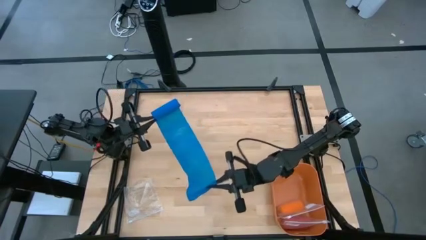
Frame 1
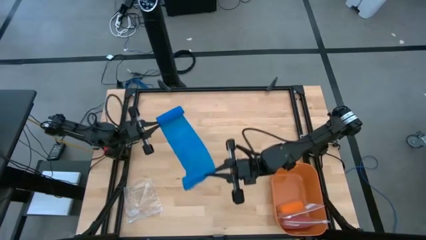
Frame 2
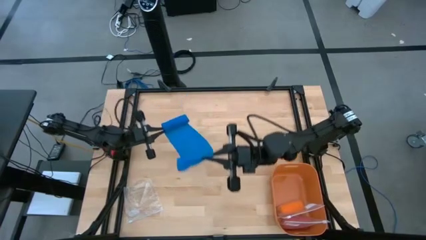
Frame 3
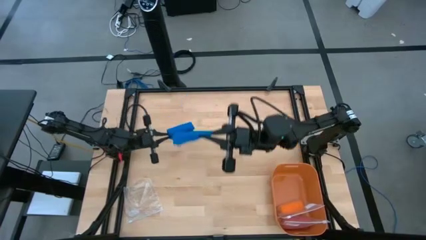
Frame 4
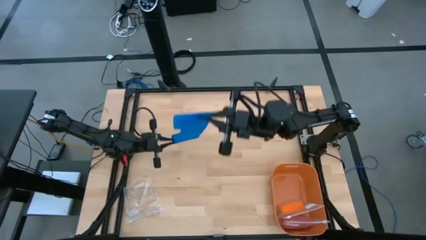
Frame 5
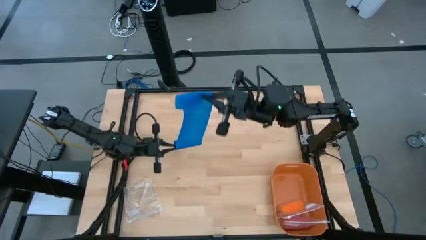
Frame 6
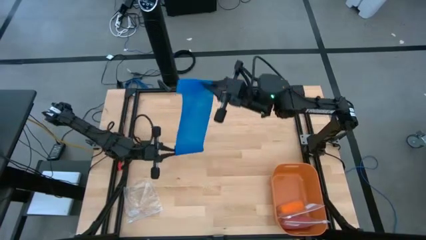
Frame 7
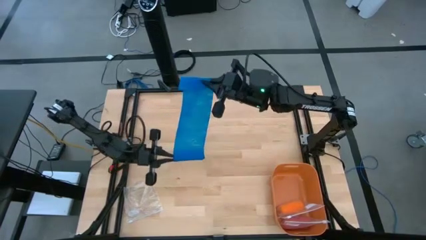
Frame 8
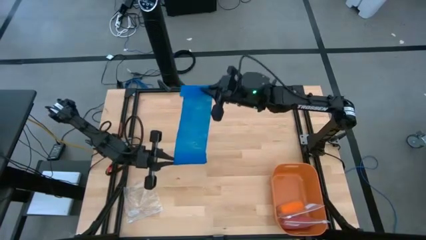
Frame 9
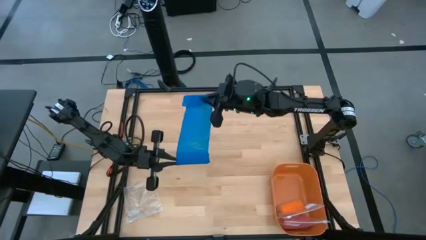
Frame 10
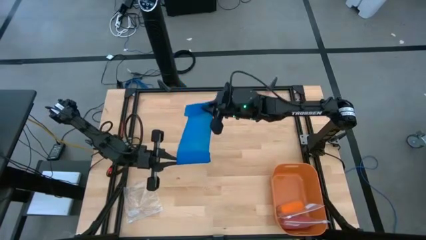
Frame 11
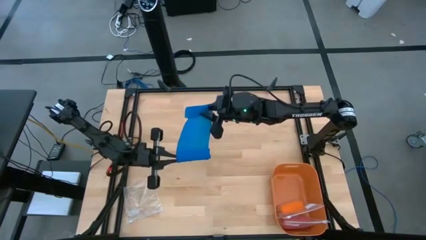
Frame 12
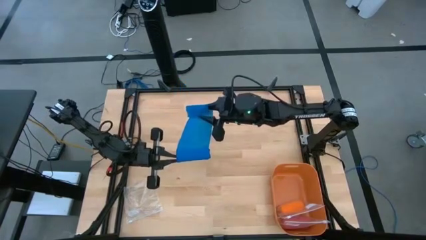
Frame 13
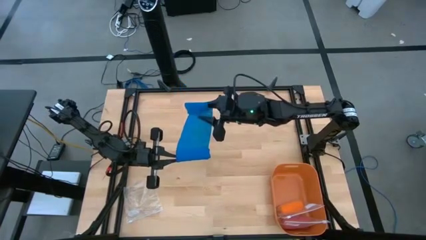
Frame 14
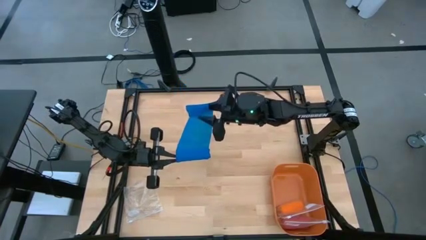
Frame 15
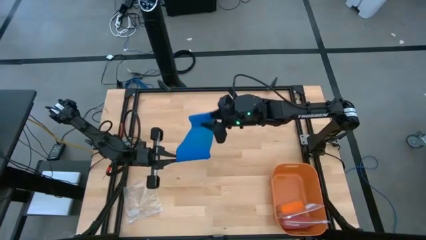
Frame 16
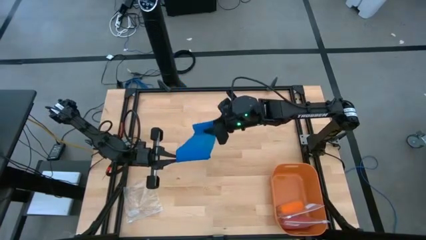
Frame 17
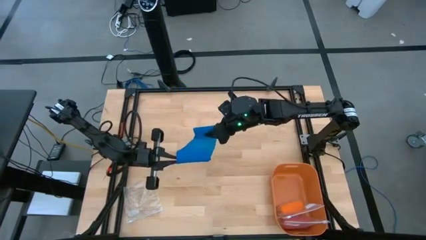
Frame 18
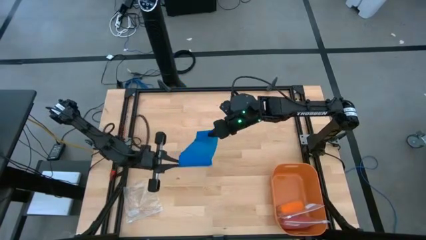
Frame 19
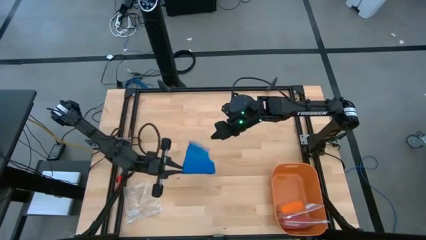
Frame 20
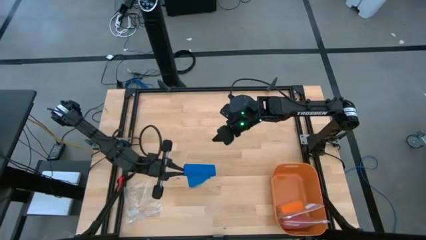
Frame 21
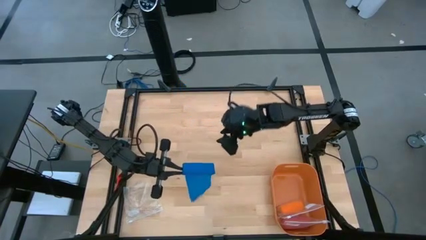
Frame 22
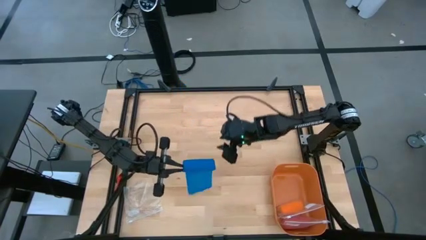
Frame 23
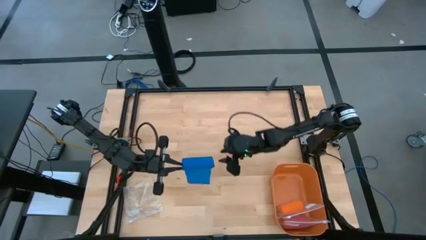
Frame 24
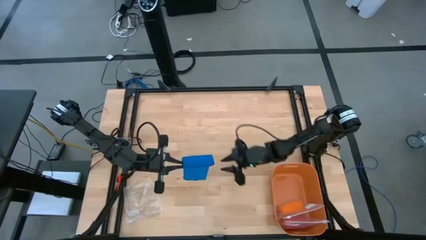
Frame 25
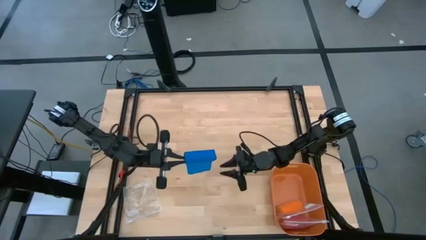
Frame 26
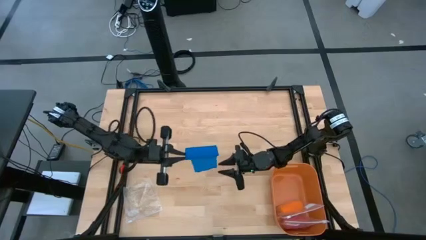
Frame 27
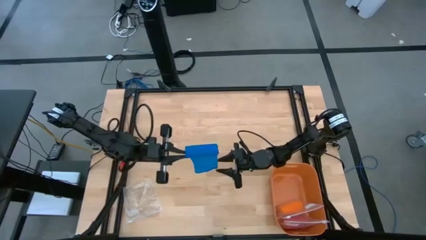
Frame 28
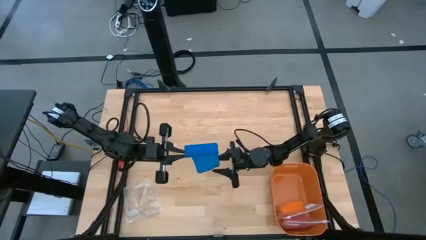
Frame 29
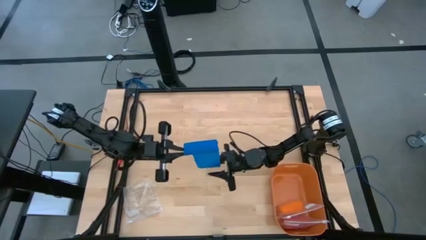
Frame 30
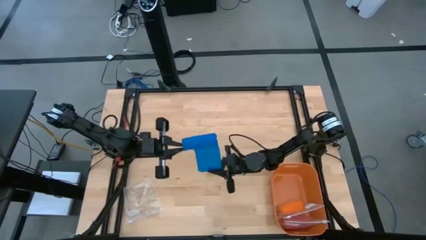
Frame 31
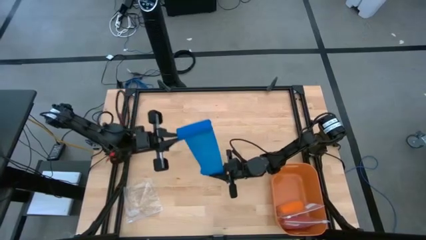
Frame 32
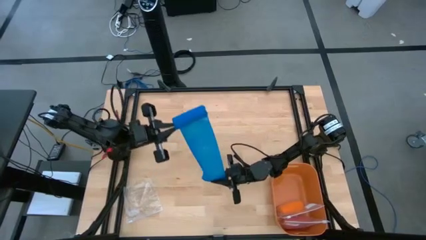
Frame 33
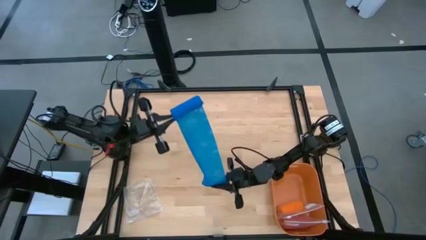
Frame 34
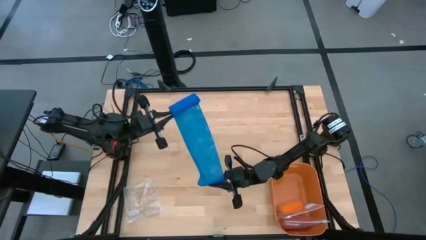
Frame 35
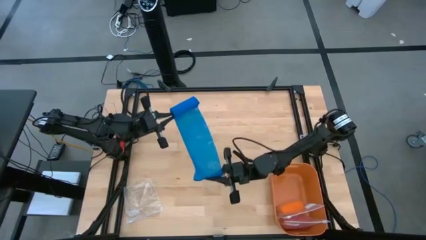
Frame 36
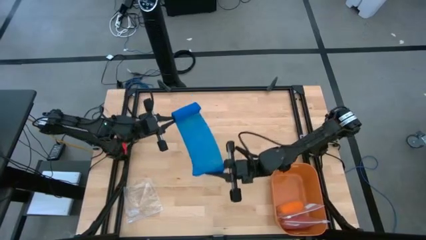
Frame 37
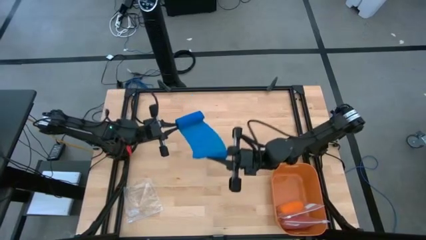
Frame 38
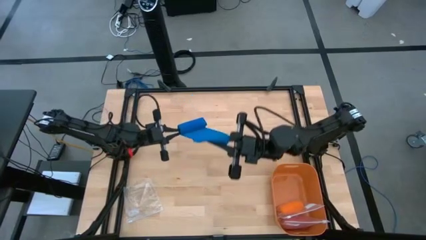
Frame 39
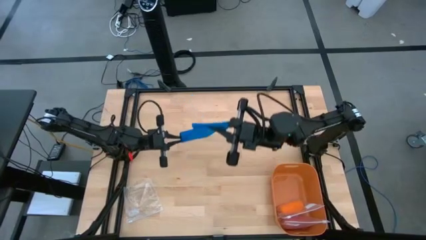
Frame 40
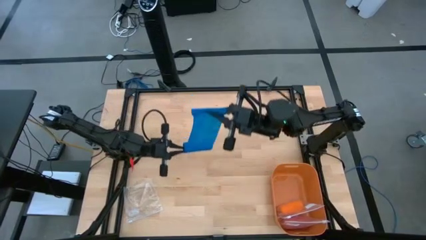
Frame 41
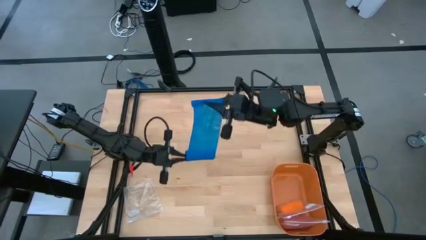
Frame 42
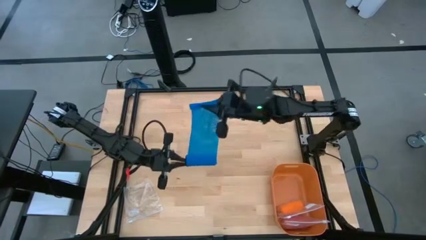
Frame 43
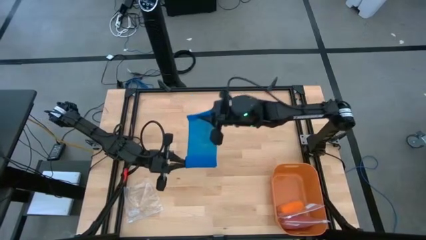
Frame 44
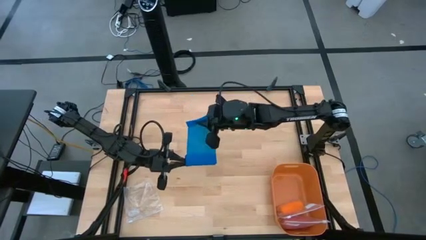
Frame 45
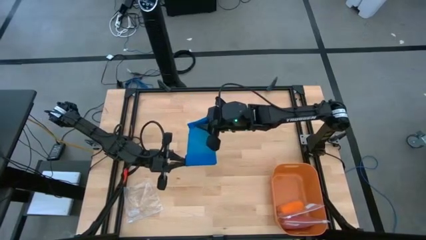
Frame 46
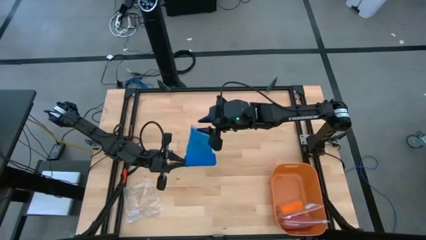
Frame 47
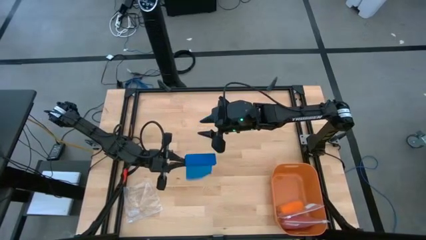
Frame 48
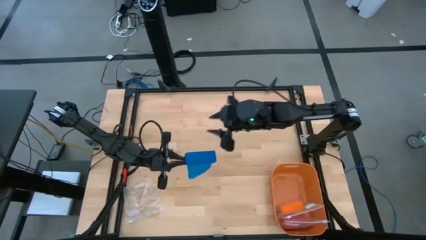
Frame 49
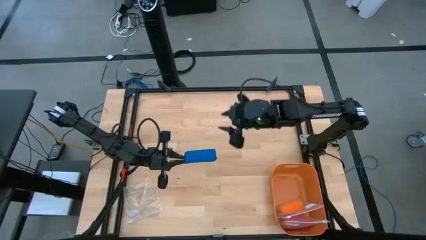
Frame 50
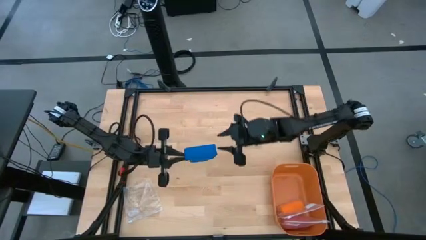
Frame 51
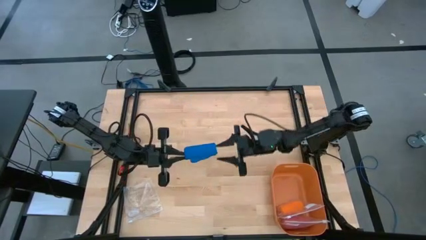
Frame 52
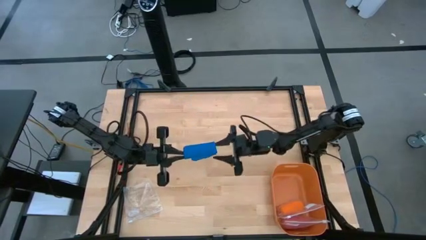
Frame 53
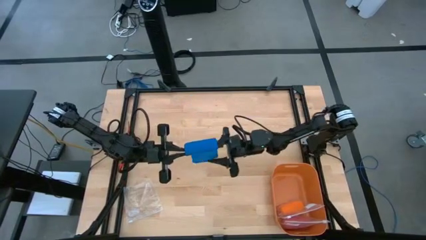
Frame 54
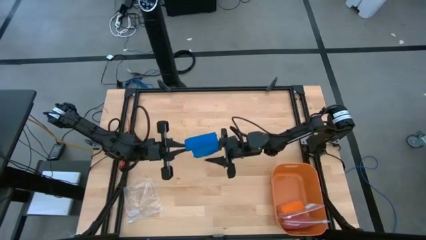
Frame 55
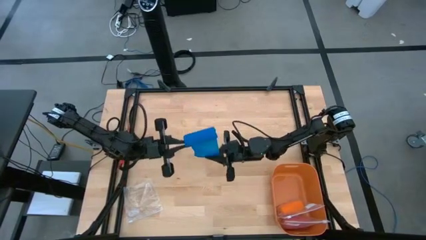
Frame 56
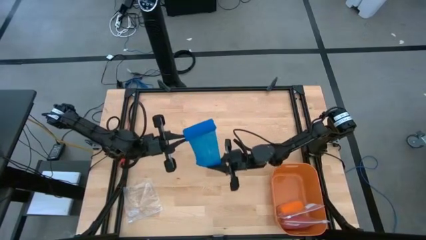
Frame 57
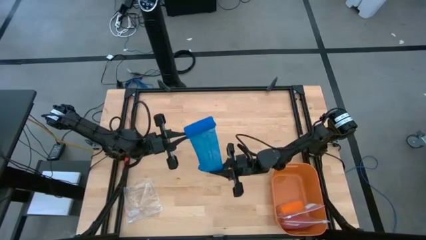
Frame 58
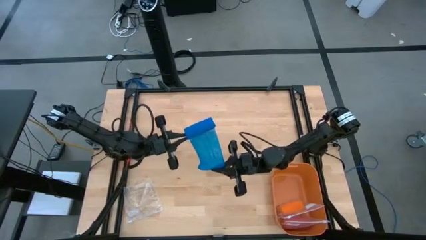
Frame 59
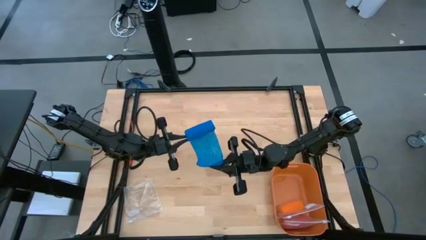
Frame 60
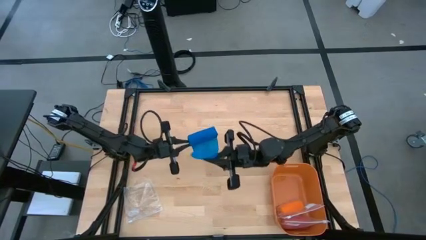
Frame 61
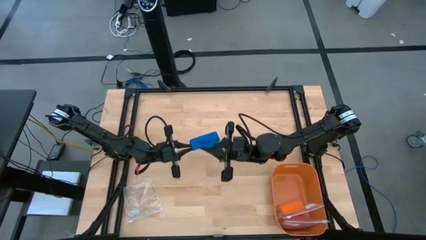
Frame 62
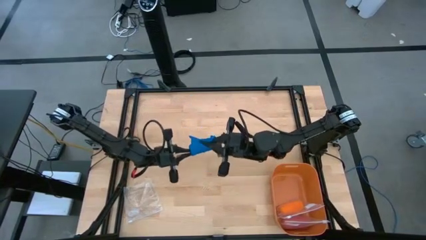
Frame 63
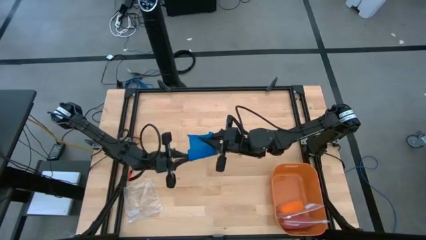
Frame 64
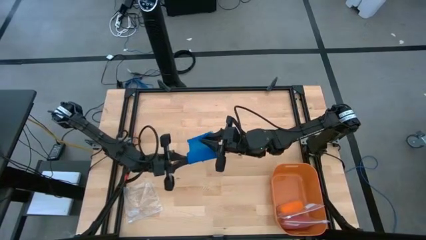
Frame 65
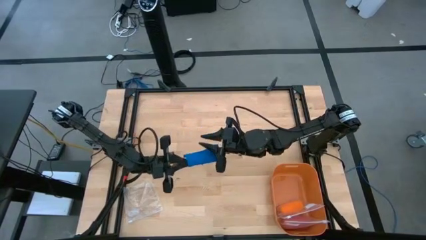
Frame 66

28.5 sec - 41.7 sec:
Task: Roll bandage
Roll the blue bandage
